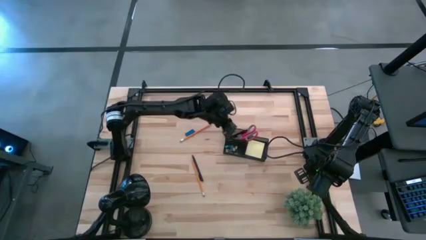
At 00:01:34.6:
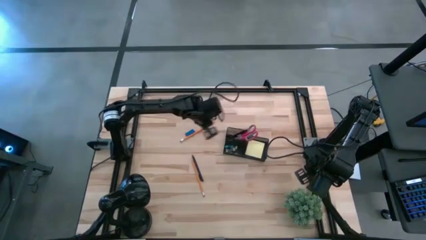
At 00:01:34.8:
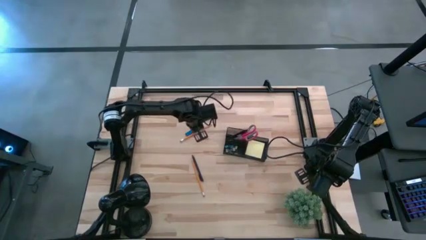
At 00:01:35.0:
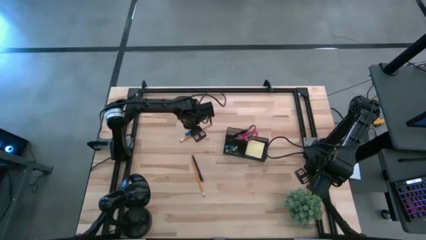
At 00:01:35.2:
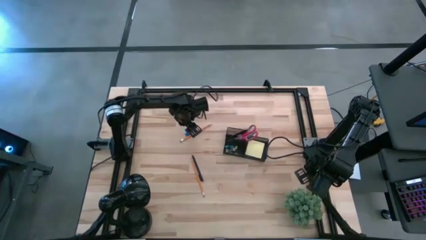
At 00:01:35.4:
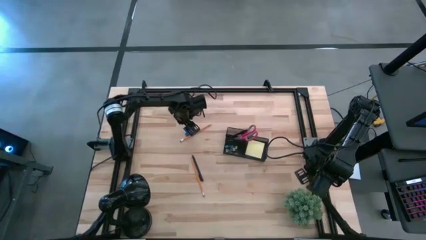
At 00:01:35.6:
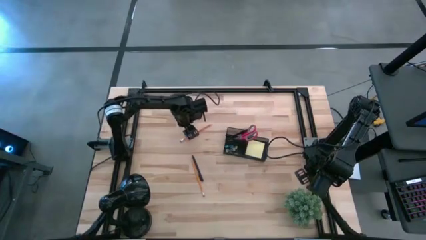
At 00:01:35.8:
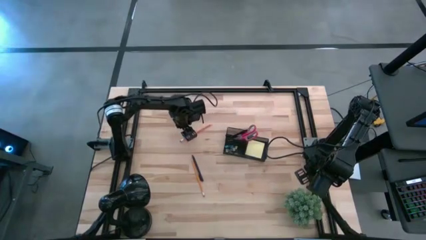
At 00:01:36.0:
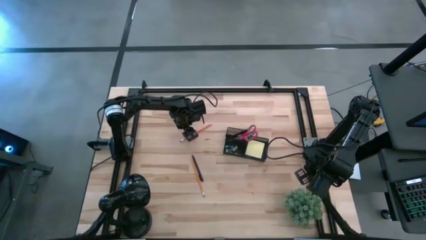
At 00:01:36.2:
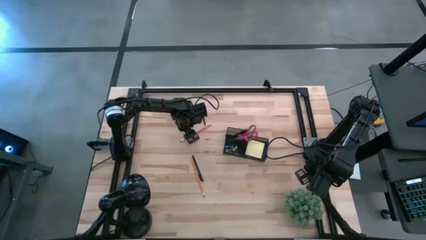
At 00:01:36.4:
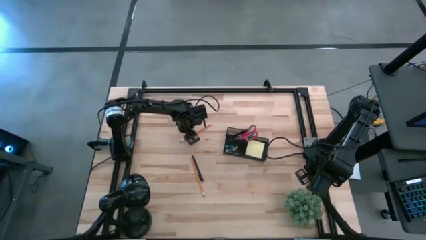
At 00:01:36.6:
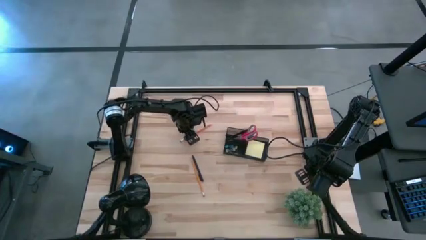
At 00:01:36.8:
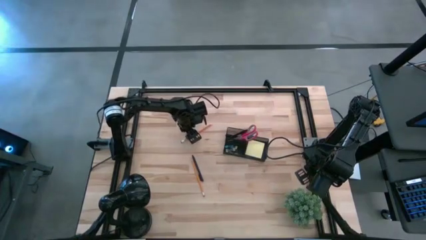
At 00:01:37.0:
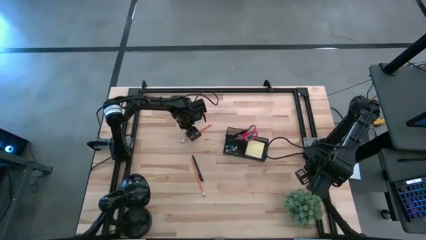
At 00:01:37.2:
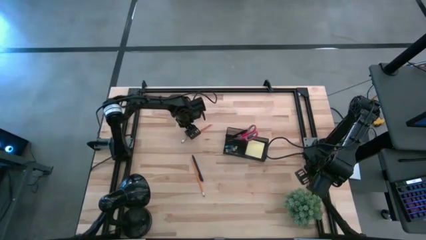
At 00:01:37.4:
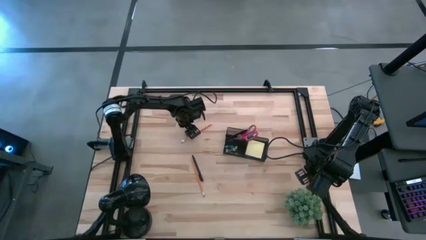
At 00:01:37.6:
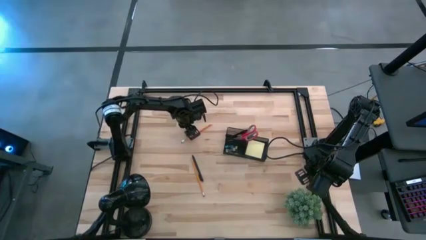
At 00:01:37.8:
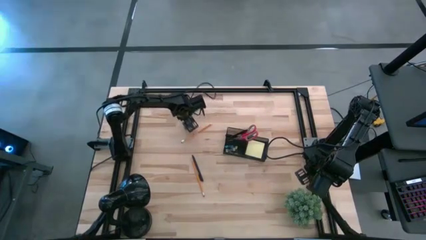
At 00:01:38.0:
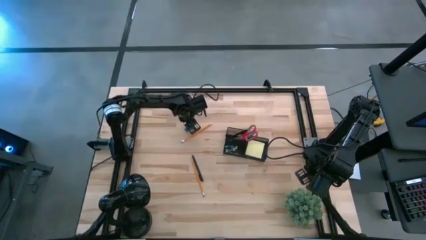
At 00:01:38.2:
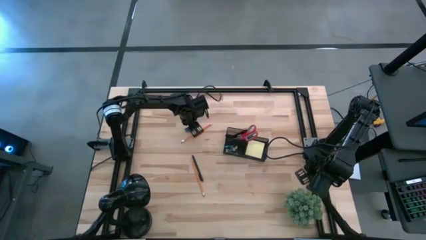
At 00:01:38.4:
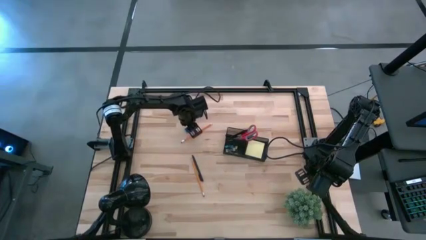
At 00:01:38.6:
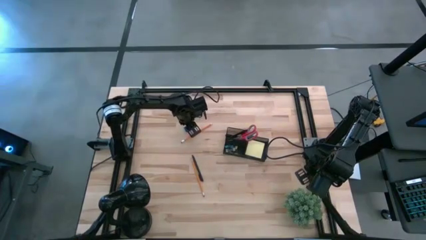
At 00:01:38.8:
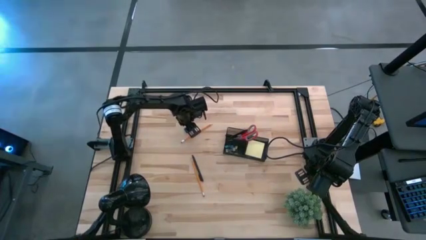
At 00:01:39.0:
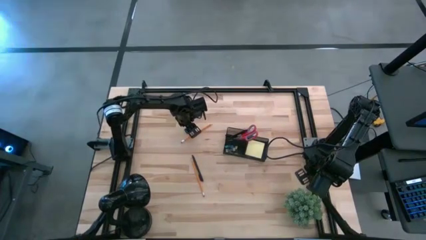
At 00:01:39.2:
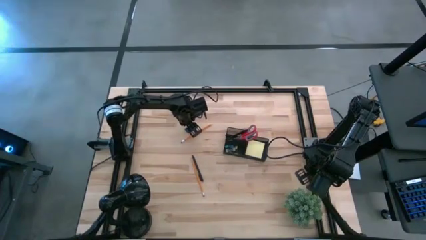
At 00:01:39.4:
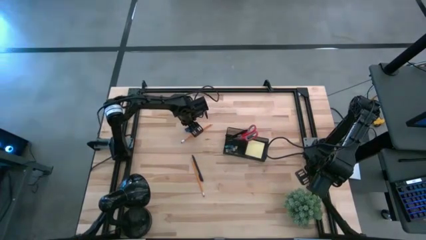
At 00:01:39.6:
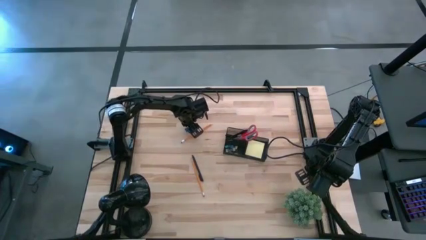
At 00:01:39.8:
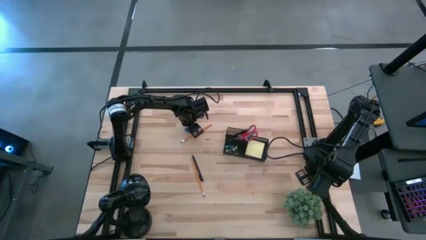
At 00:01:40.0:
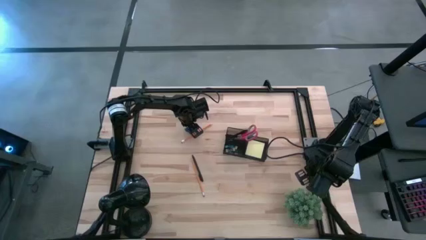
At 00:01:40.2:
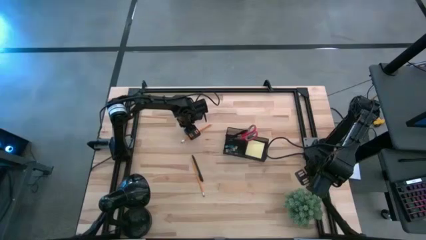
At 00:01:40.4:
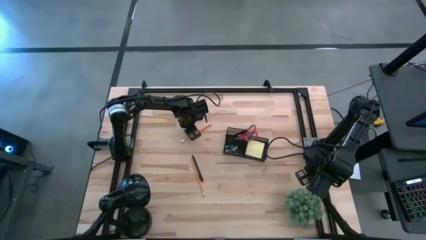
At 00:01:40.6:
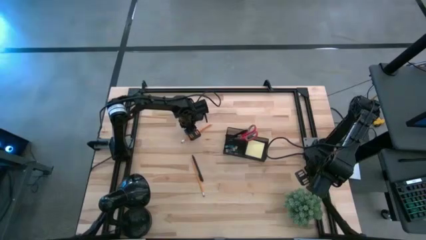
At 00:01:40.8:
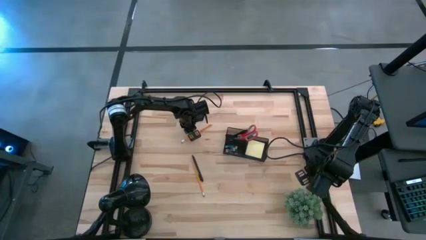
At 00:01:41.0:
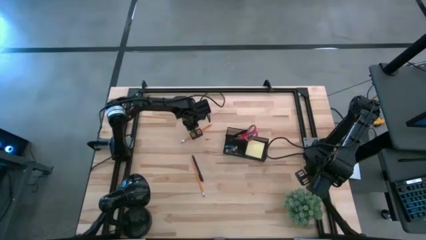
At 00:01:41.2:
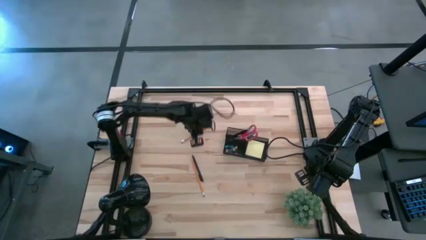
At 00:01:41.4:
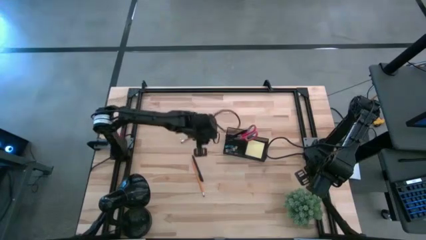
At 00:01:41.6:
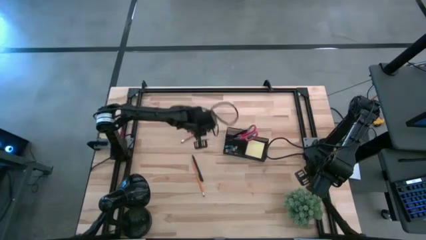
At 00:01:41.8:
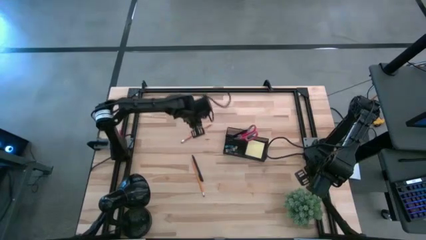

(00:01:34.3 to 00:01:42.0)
Task: Pick and place office supplies into organizer
Put the eraser into the desk organizer

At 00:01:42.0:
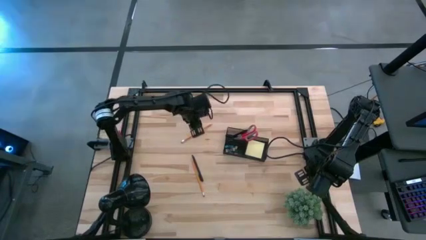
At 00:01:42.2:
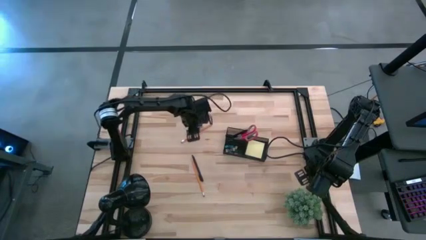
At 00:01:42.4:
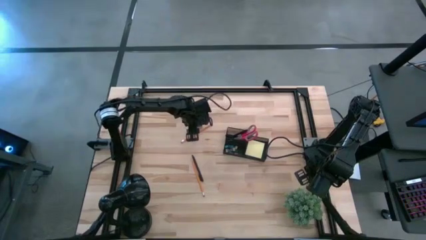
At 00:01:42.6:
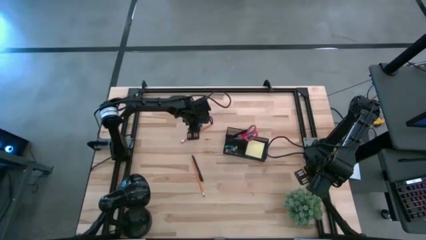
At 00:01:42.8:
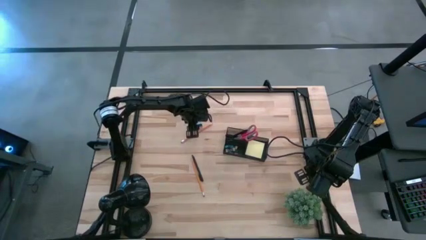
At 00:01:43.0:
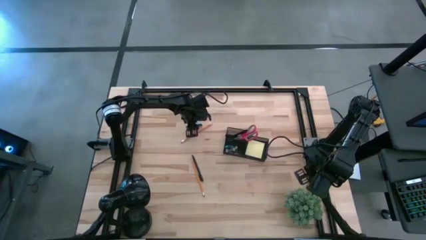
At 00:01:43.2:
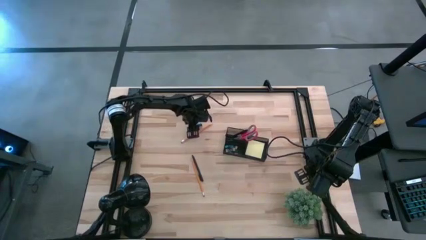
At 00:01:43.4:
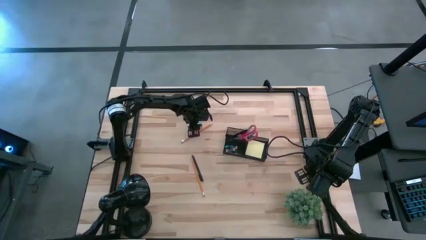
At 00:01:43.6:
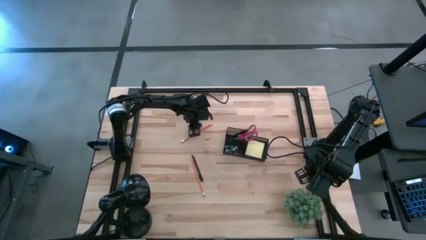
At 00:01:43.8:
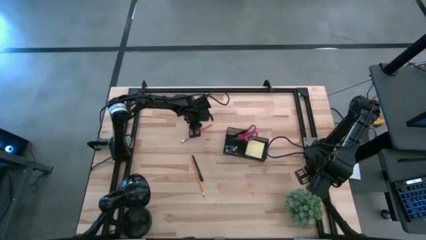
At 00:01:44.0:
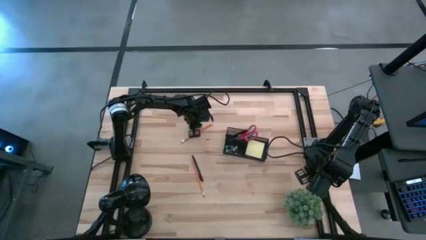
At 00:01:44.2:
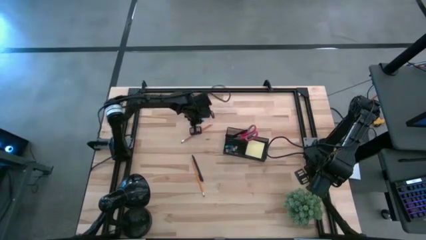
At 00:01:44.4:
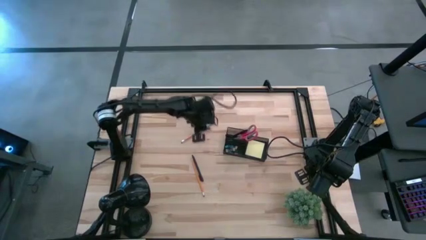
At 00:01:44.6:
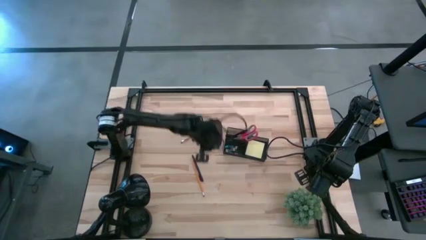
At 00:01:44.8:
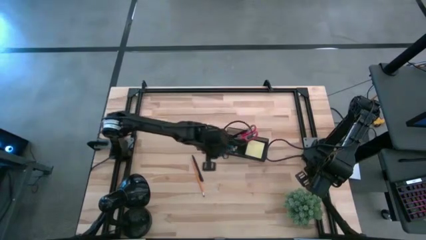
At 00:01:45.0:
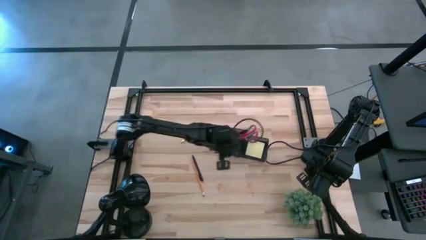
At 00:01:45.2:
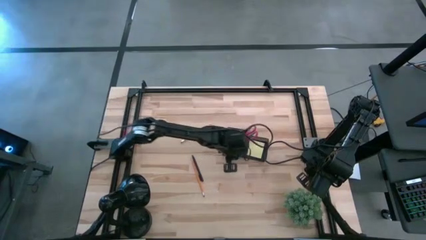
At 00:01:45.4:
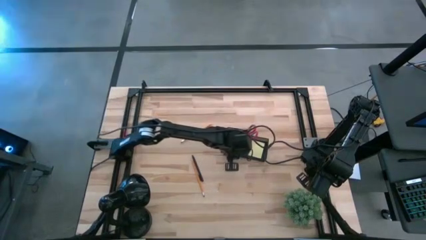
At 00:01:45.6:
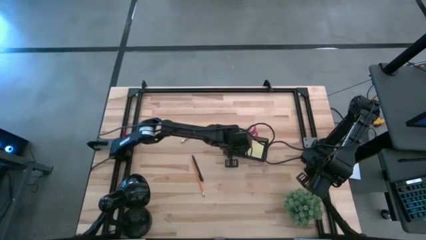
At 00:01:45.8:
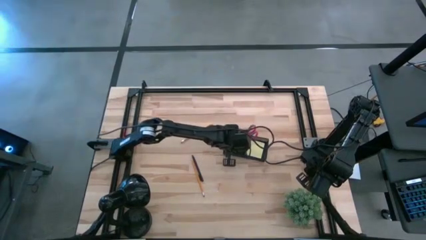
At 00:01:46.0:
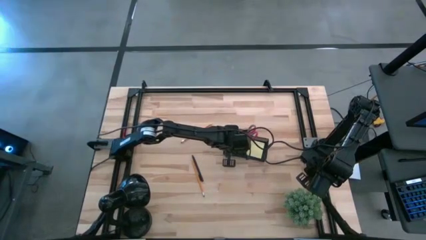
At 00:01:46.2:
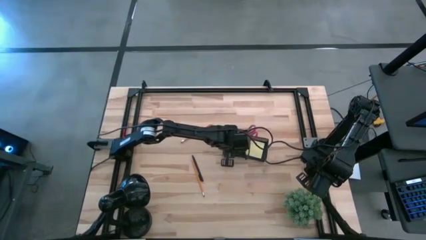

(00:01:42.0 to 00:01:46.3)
Put the eraser into the desk organizer
